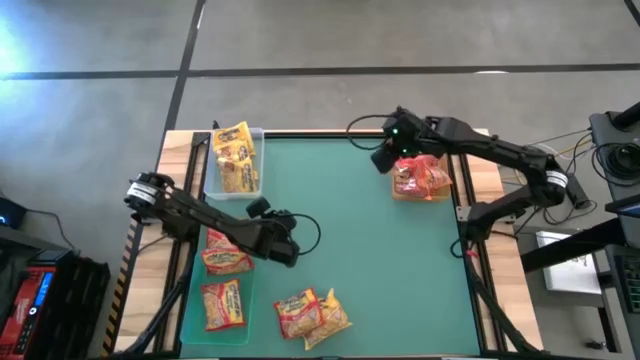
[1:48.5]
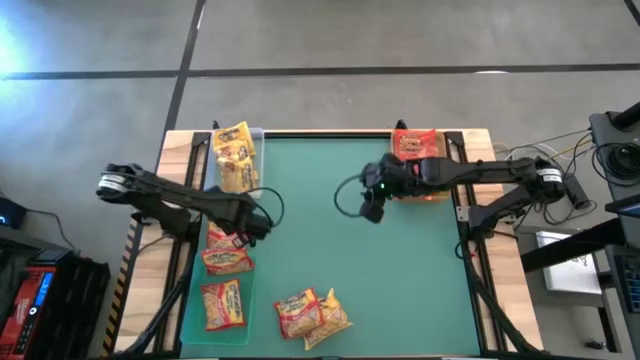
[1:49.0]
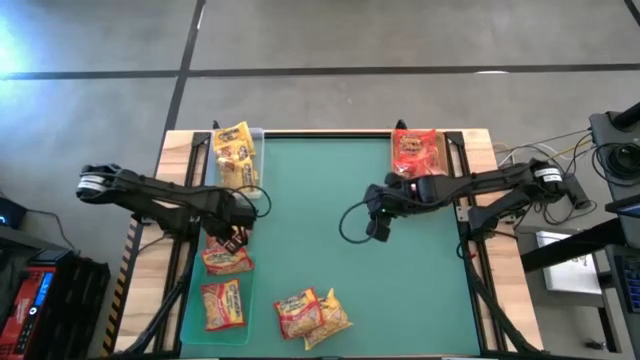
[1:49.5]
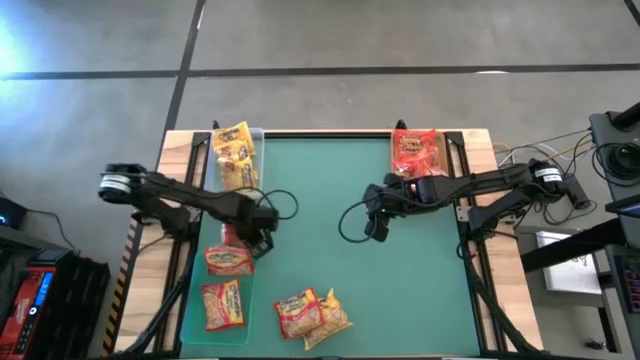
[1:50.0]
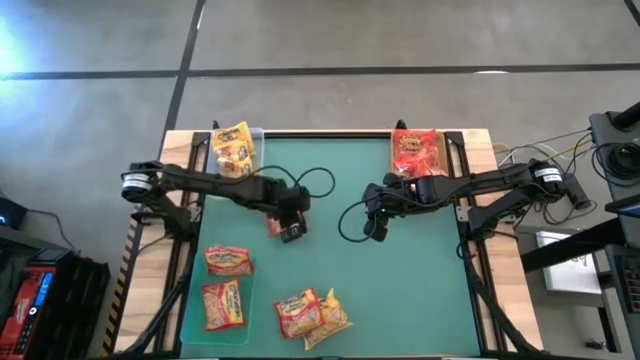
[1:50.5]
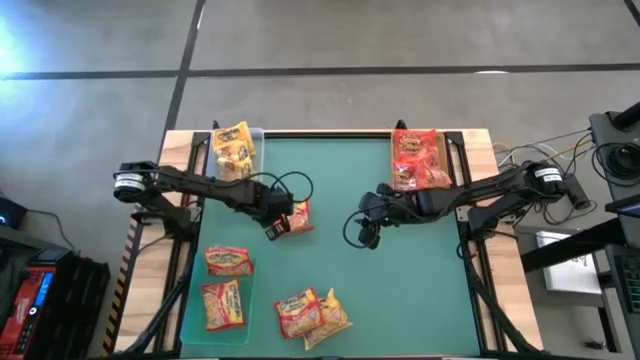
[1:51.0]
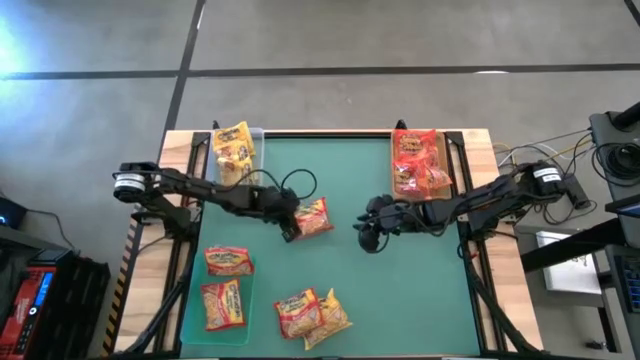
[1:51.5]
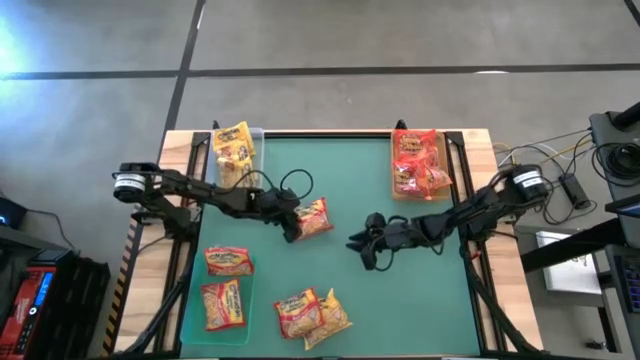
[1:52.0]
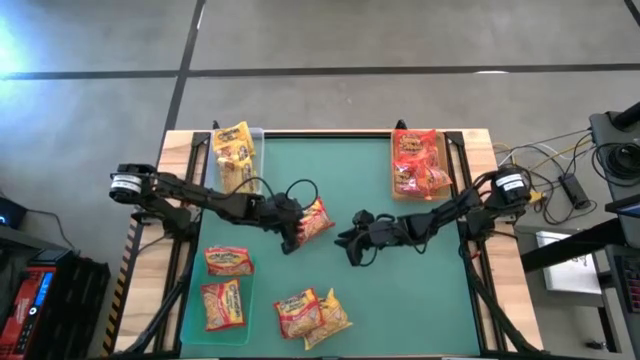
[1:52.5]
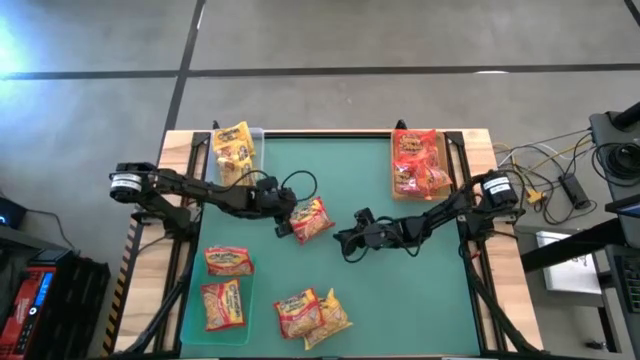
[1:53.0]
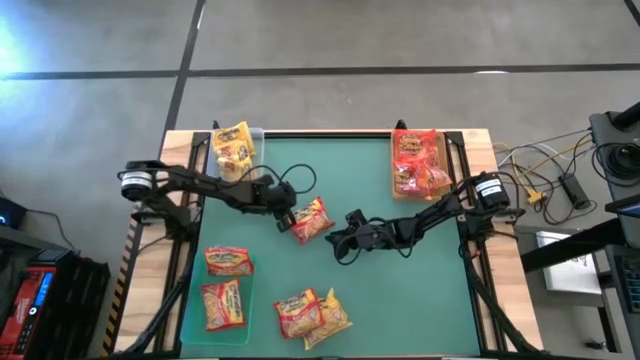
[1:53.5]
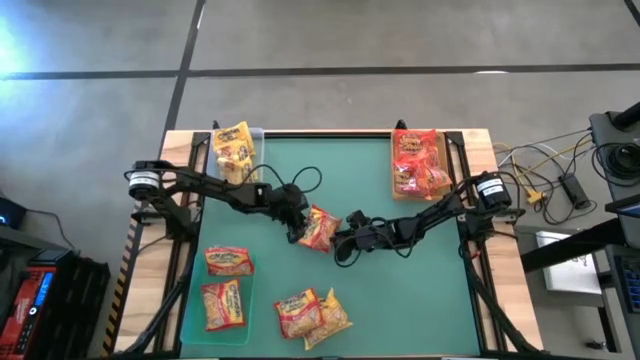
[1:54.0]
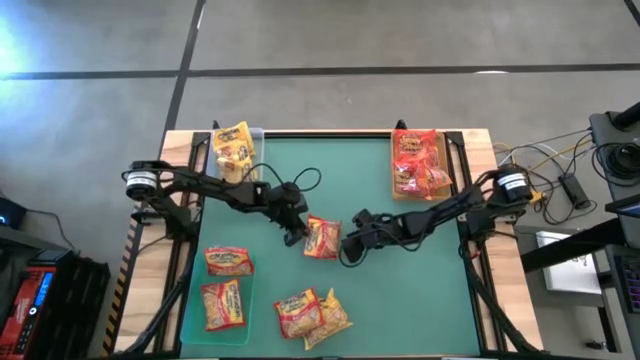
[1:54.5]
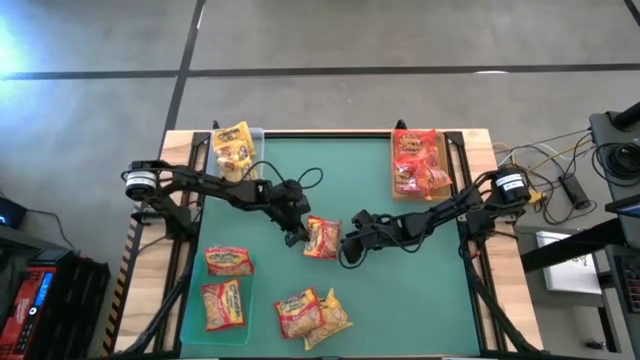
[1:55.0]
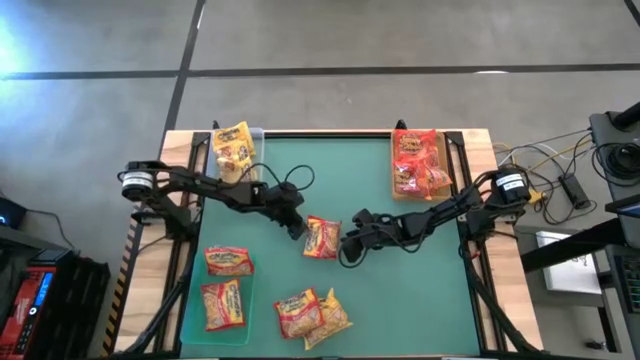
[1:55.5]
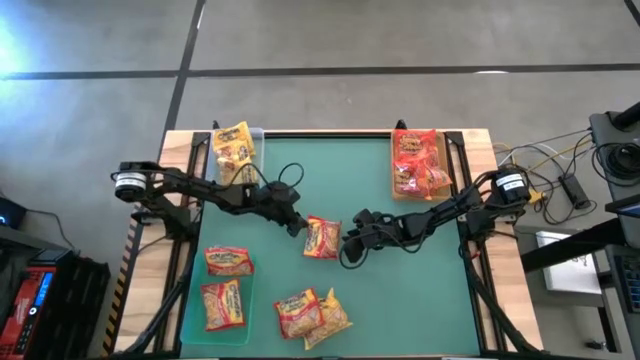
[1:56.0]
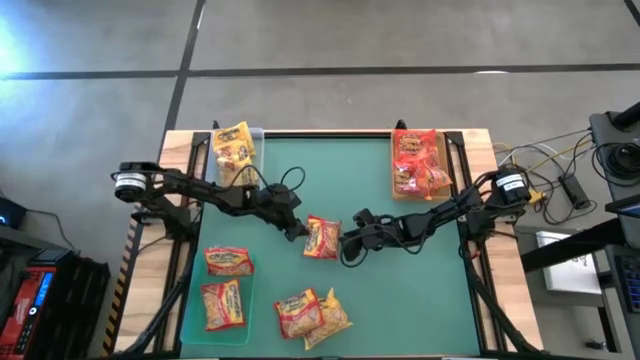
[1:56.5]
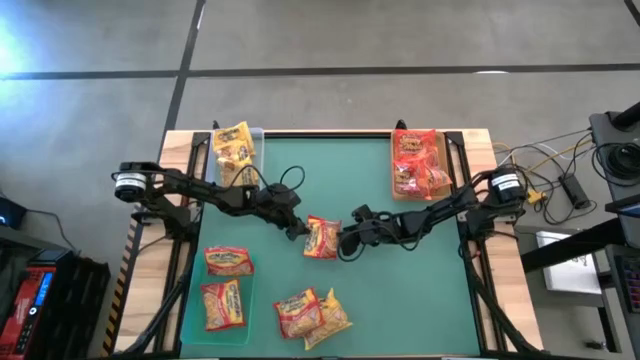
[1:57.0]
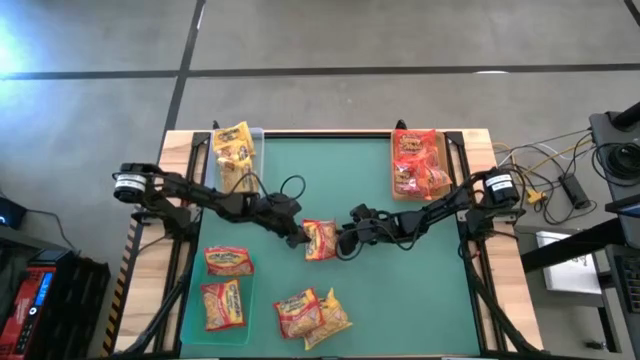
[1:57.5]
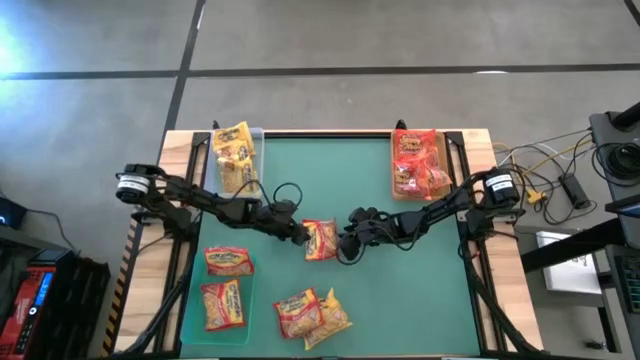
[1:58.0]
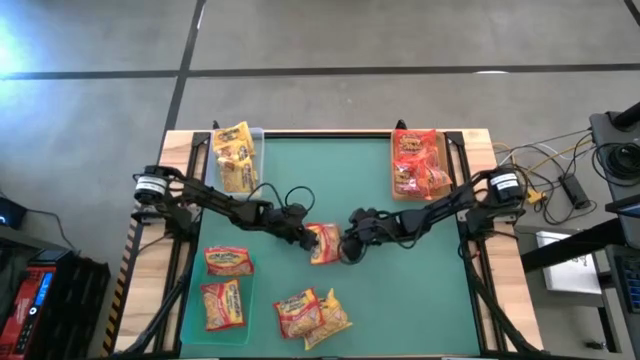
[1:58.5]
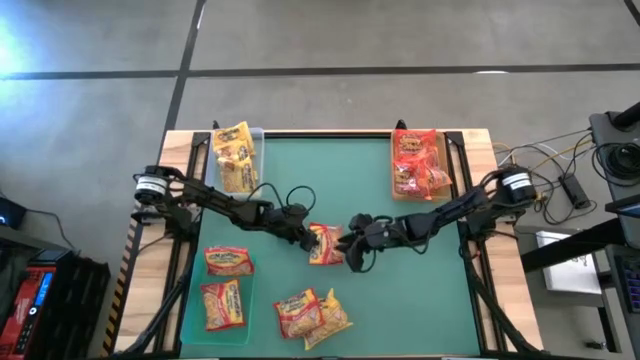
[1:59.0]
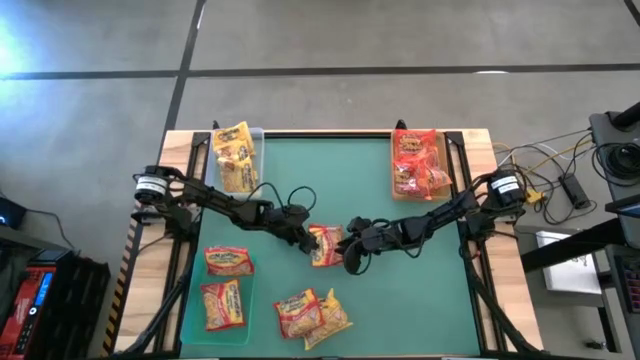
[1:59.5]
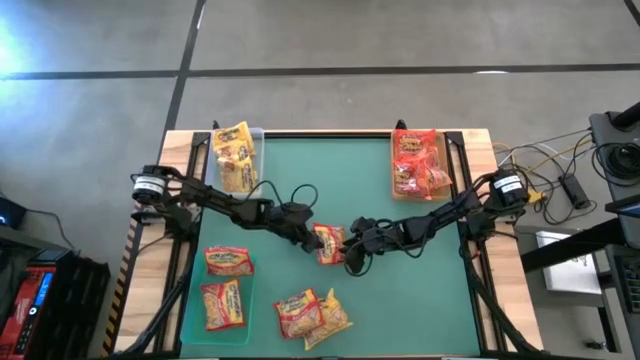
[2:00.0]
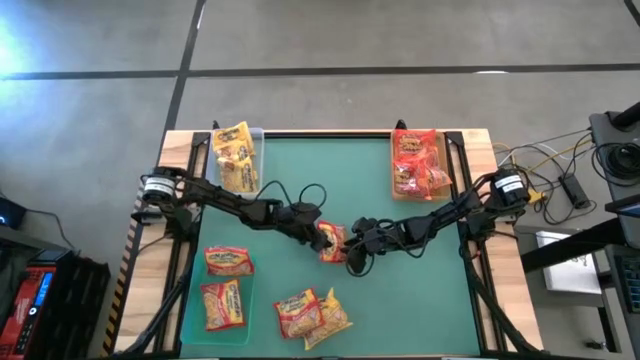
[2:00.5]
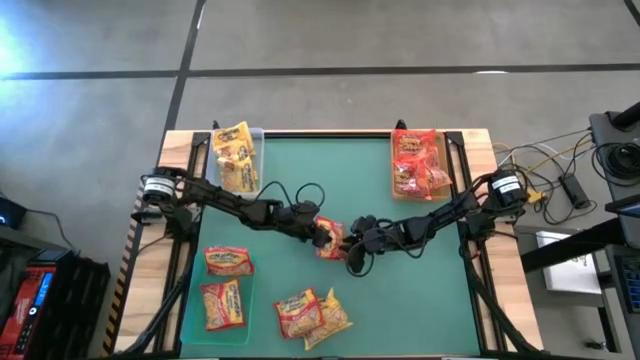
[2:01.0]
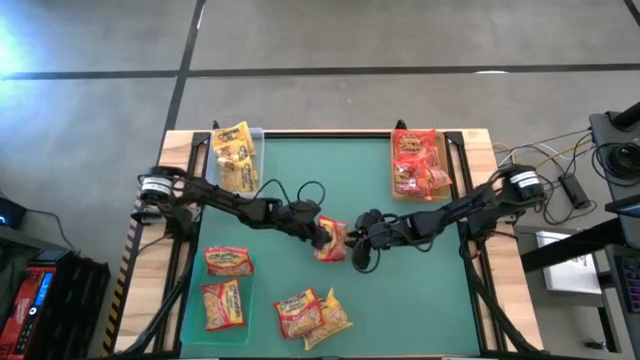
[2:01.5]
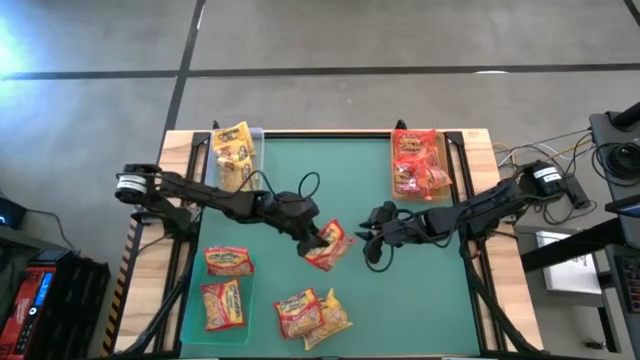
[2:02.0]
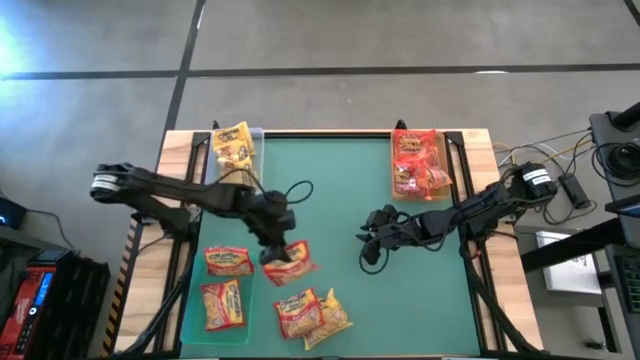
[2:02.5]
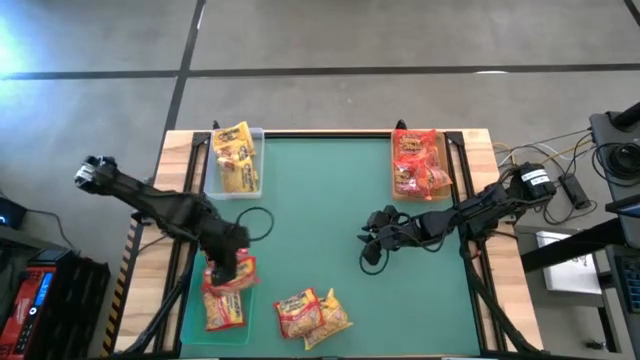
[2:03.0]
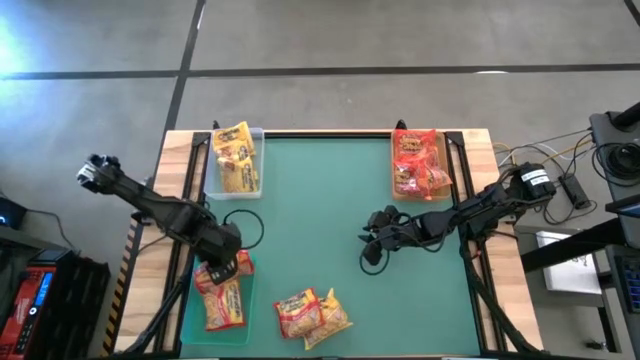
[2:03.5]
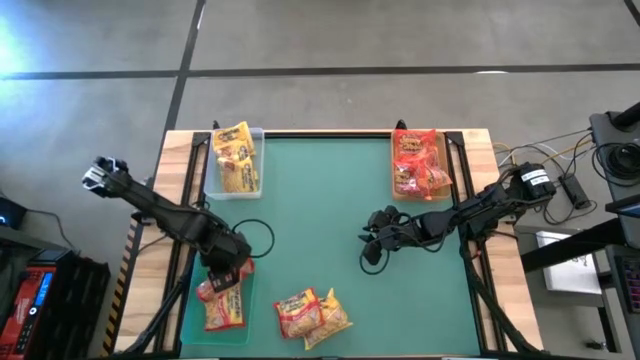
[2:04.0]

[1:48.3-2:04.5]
Task: Sort Maruchan noodles
Put the red noodle pack into the green bin

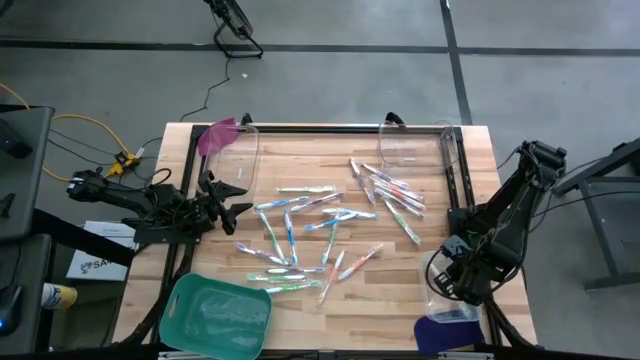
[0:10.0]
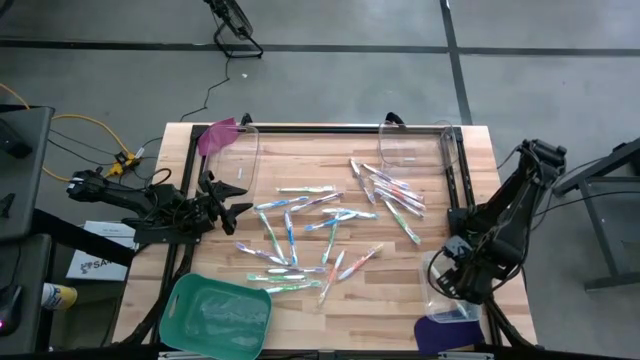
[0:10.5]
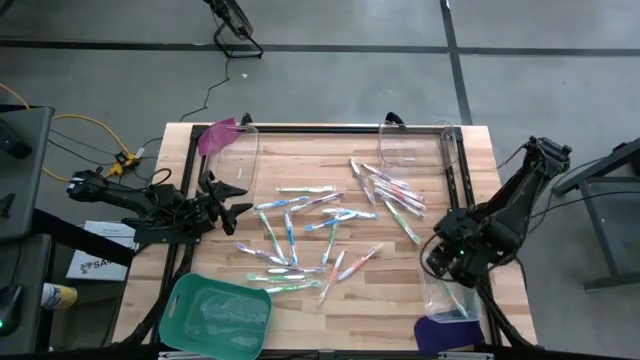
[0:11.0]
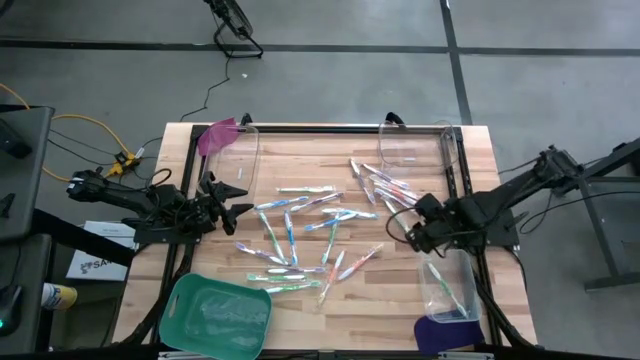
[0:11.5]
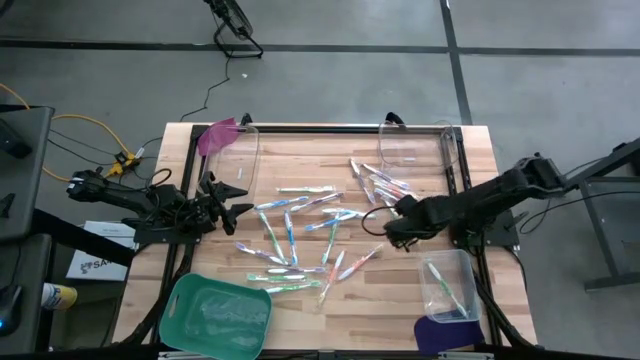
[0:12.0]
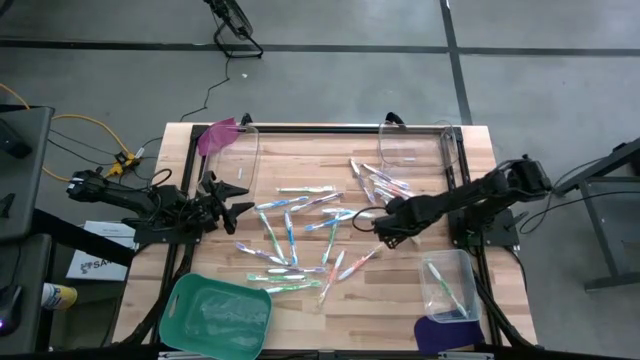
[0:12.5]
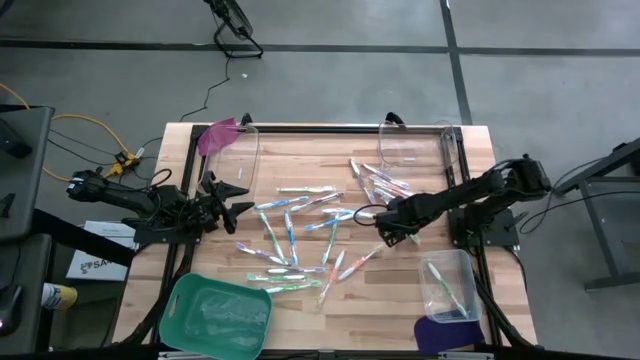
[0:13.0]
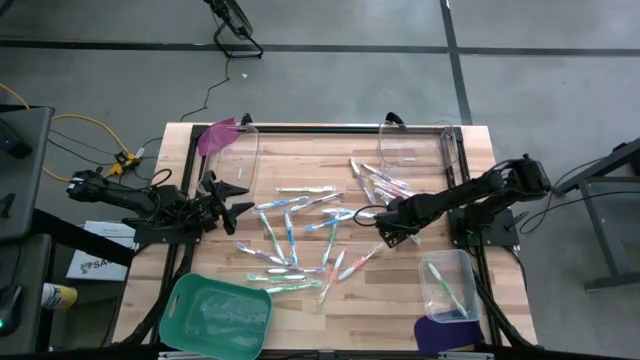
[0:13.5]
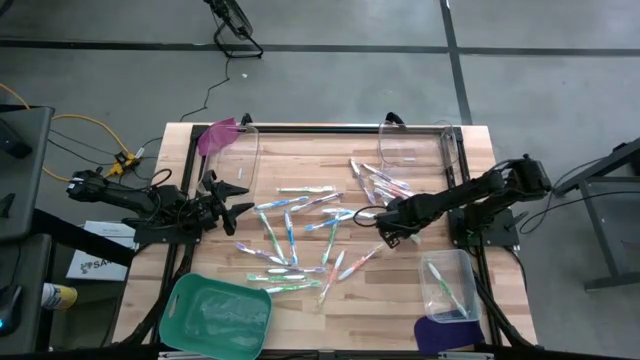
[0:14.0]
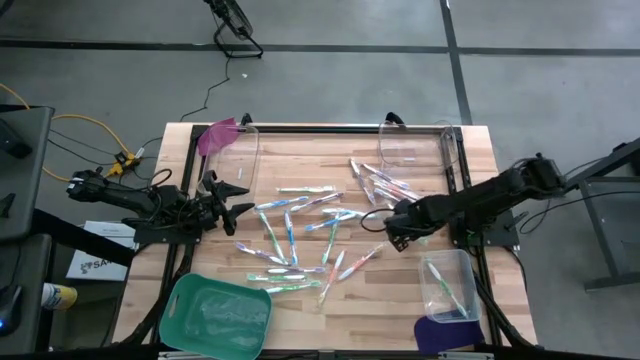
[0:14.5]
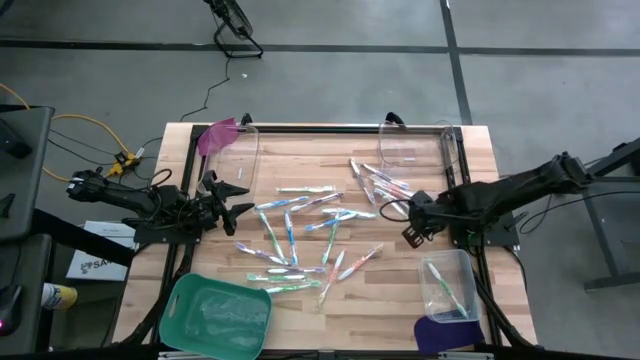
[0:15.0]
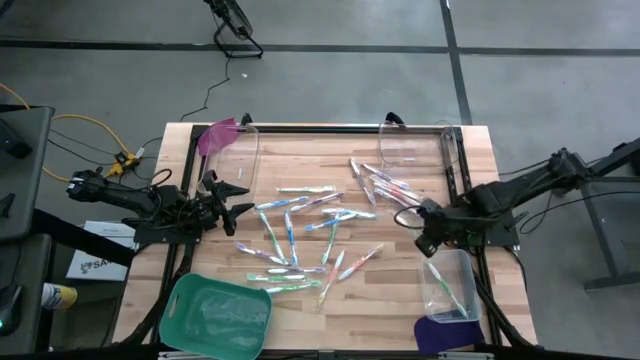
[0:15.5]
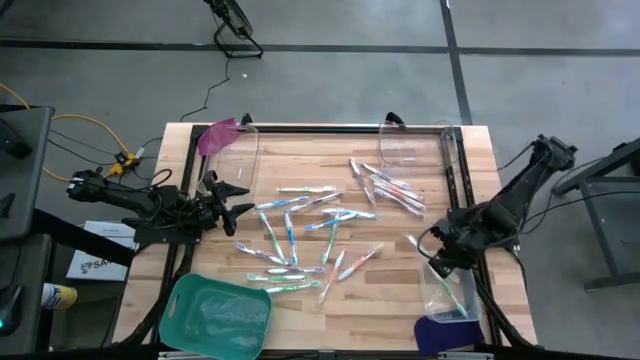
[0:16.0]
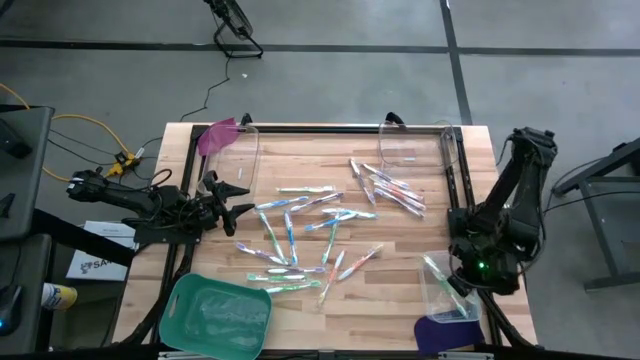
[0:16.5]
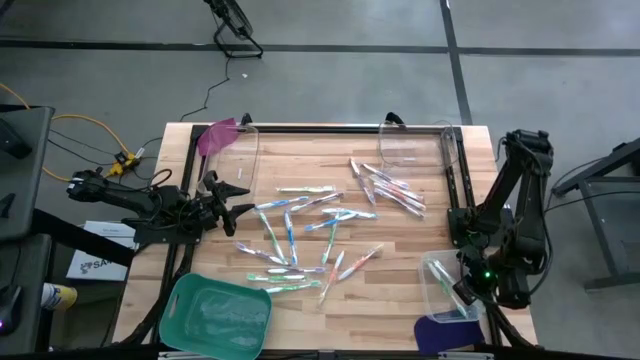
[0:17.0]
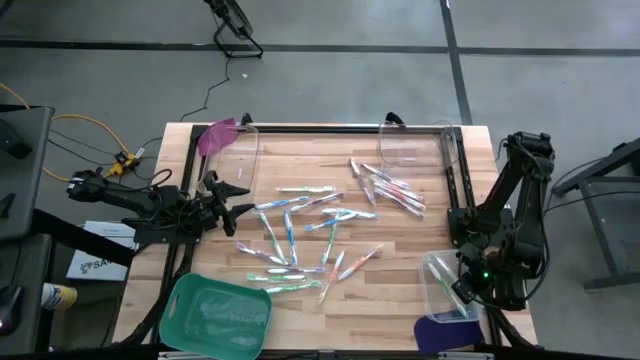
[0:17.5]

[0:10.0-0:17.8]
Task: Pick & Place Toothbrushes
Put the green toothbrush into the white bin
